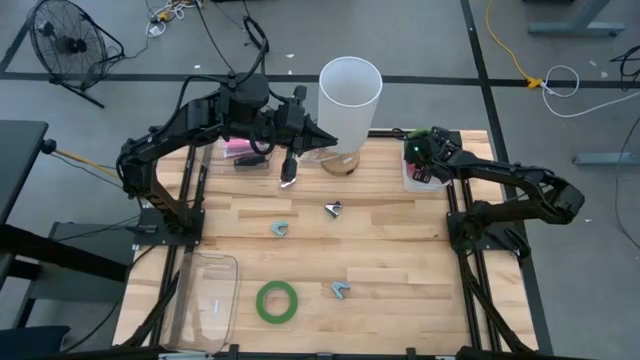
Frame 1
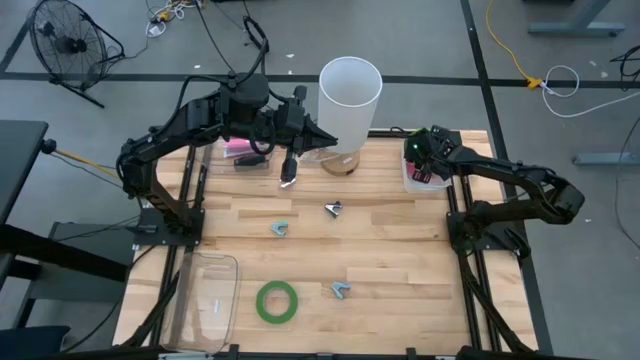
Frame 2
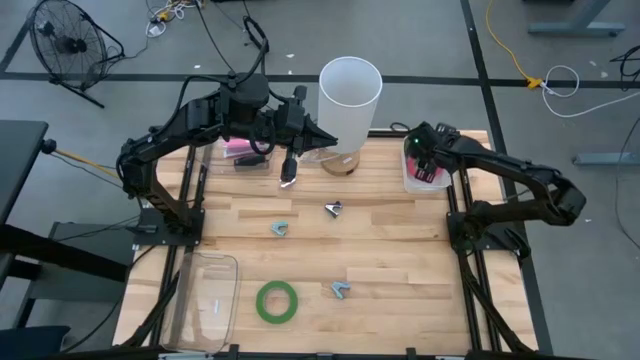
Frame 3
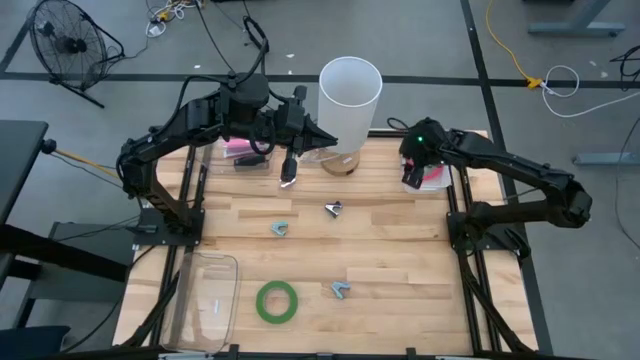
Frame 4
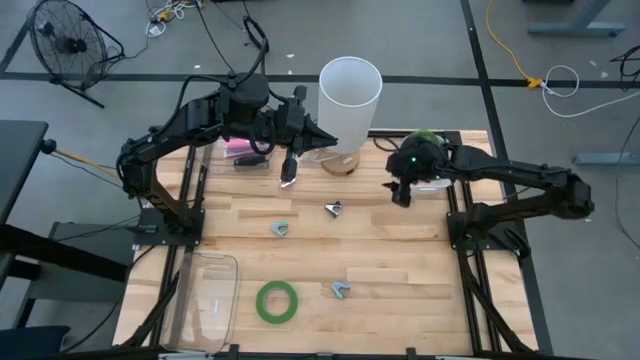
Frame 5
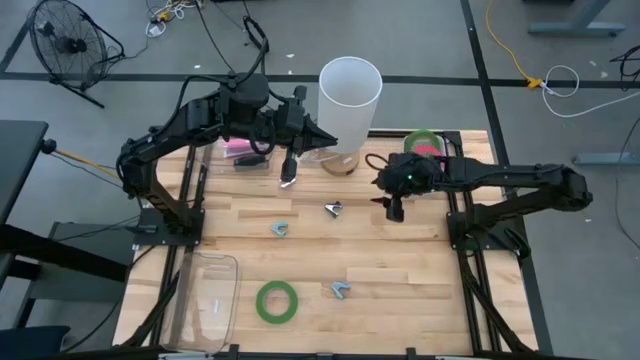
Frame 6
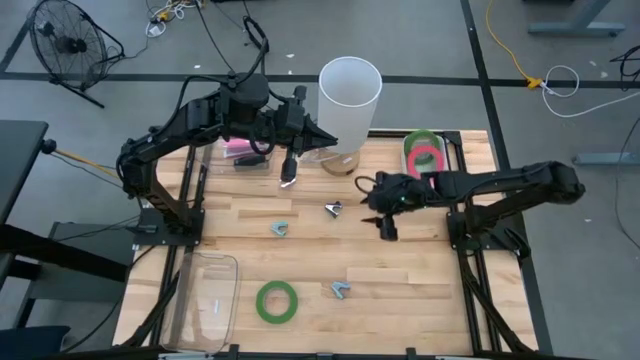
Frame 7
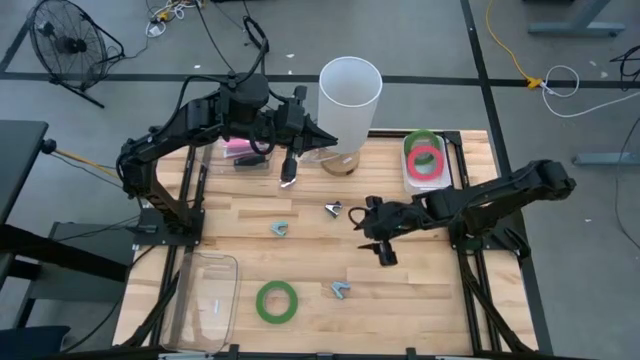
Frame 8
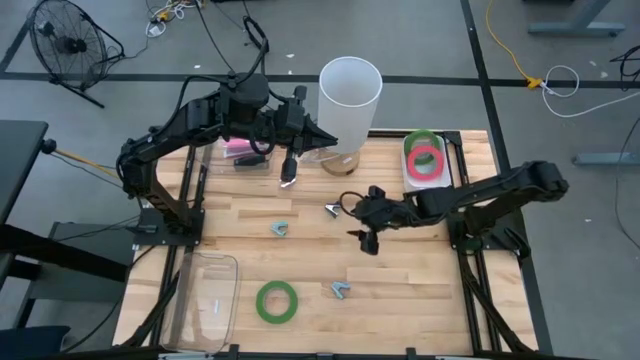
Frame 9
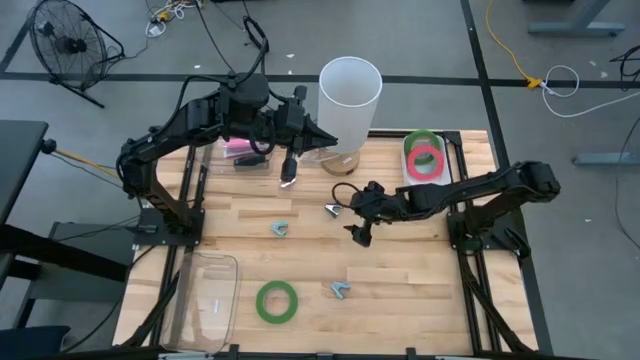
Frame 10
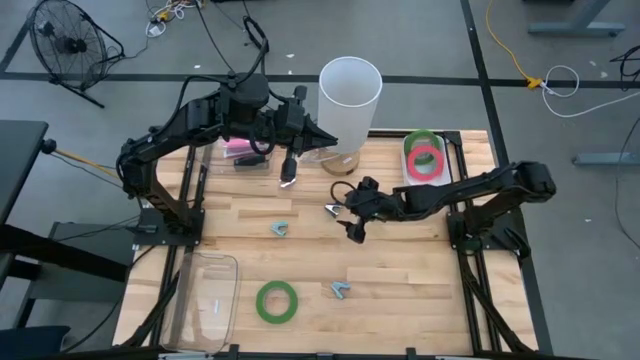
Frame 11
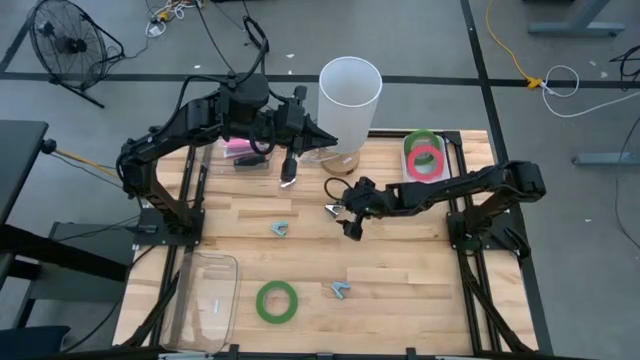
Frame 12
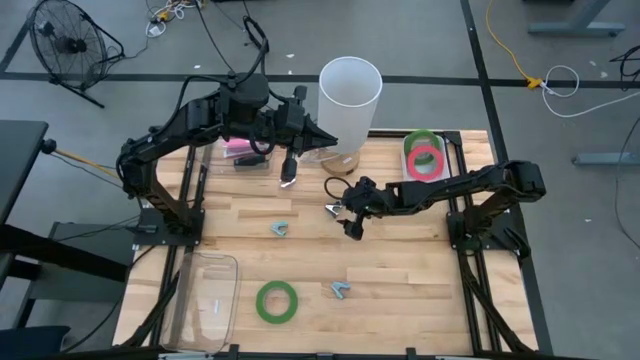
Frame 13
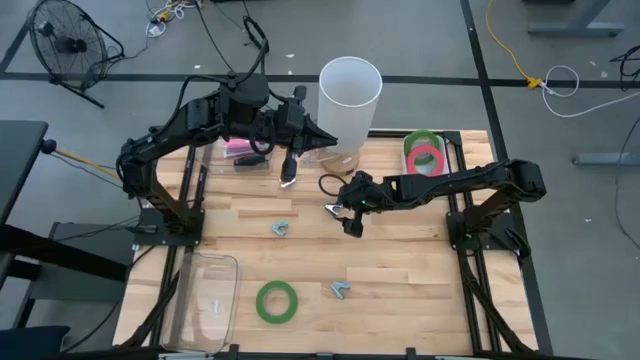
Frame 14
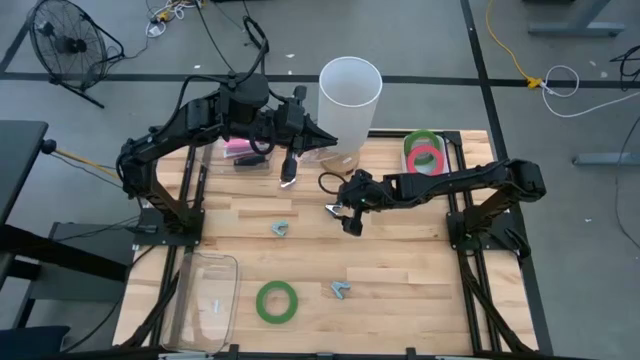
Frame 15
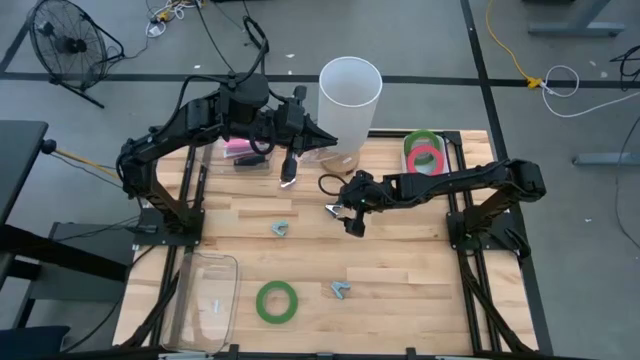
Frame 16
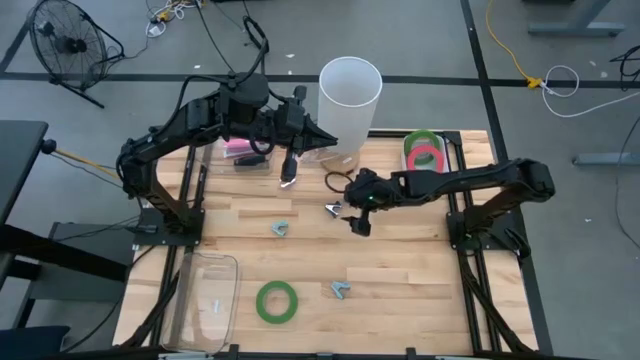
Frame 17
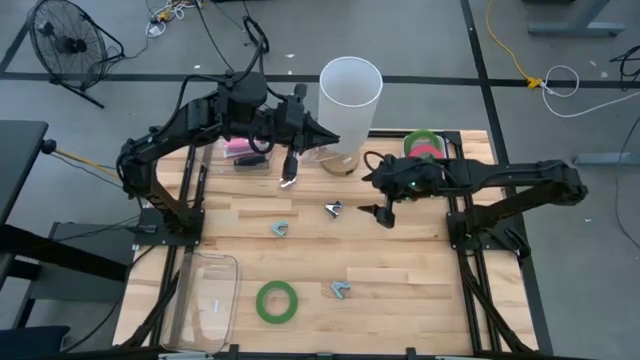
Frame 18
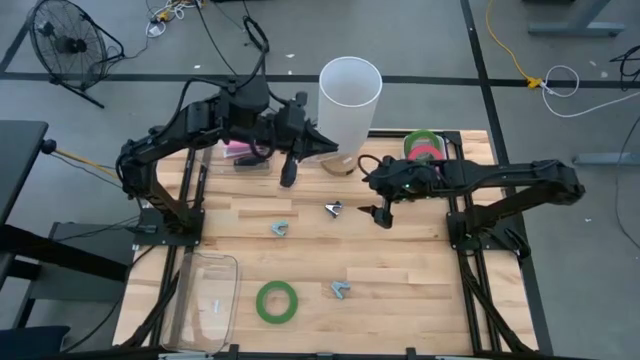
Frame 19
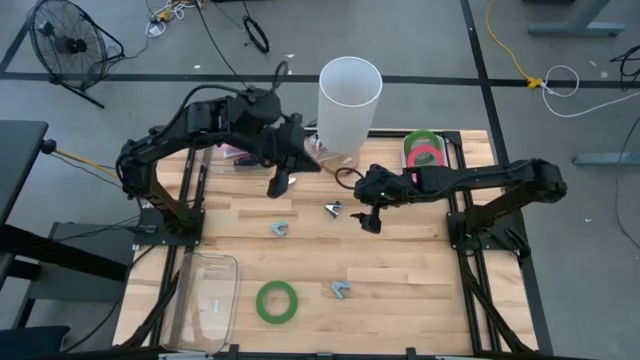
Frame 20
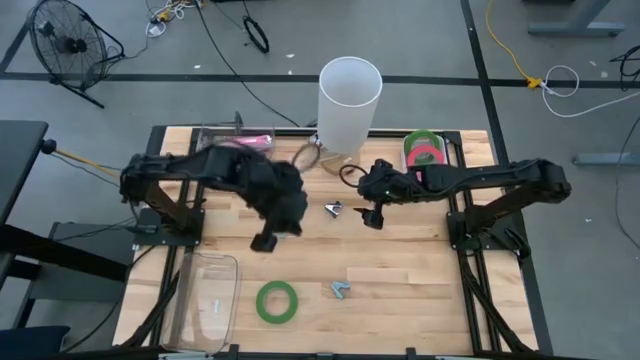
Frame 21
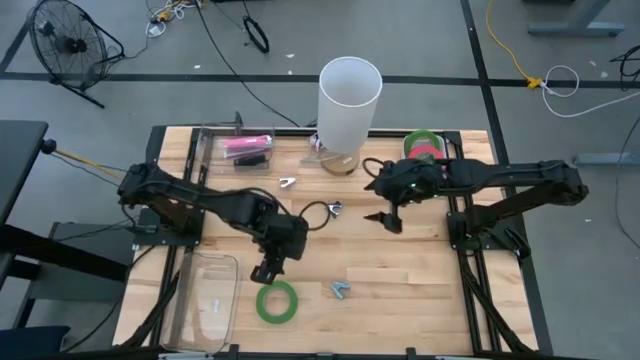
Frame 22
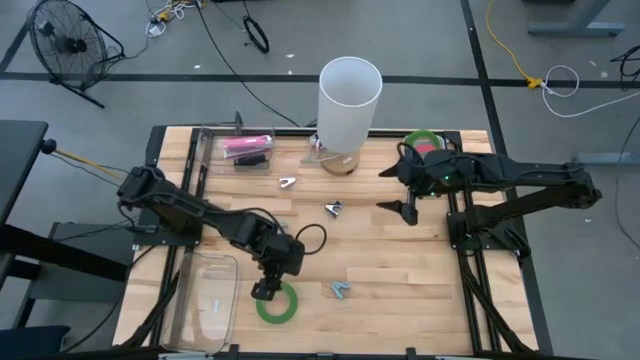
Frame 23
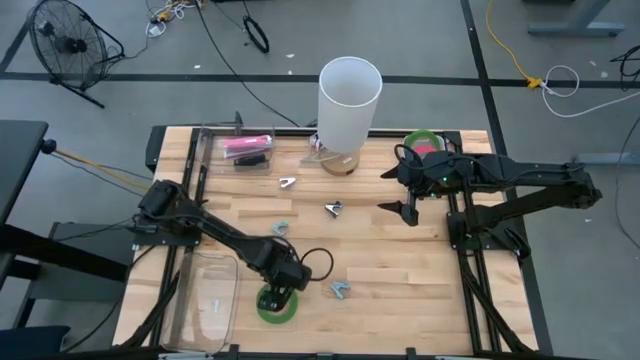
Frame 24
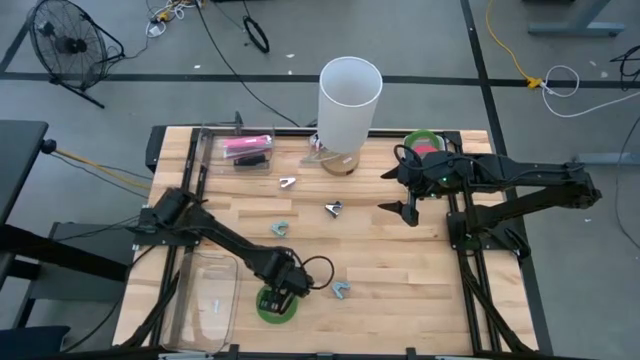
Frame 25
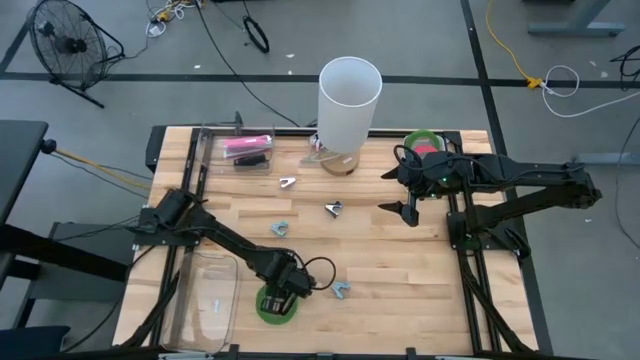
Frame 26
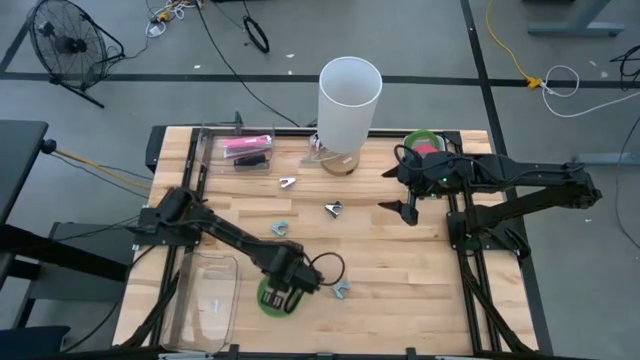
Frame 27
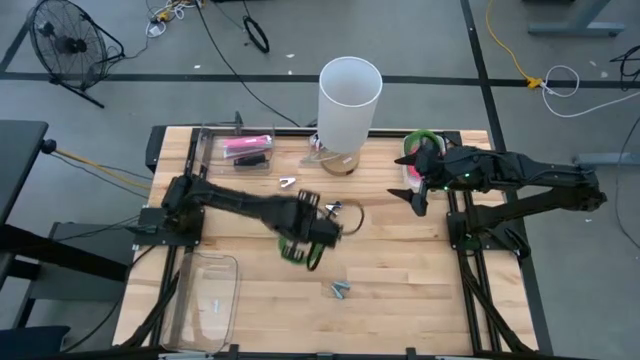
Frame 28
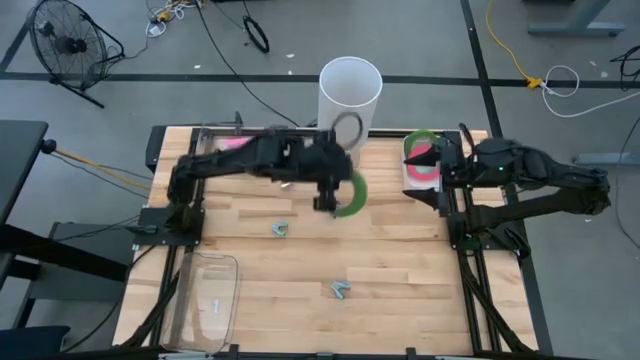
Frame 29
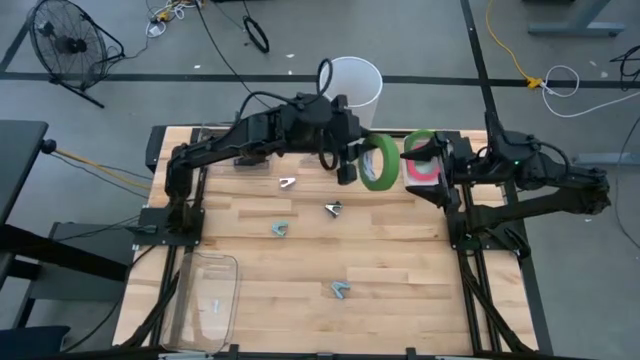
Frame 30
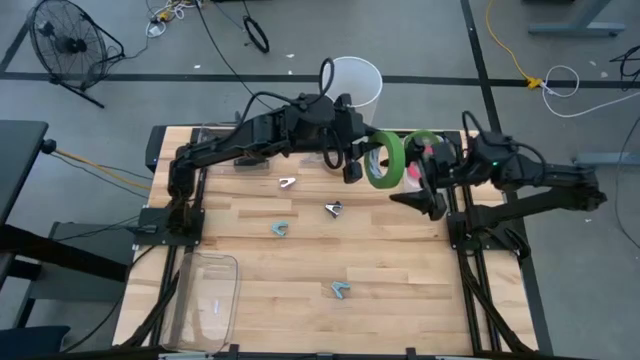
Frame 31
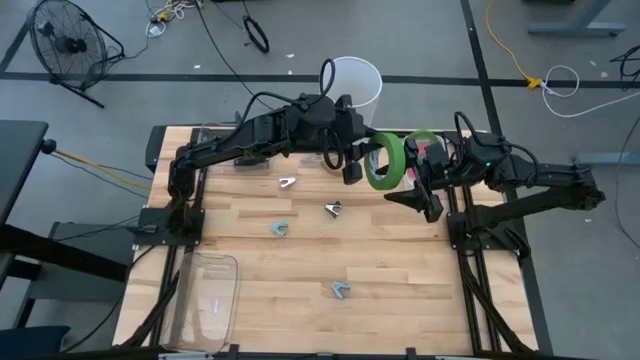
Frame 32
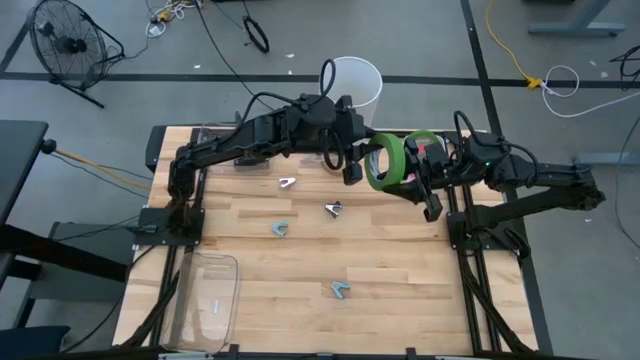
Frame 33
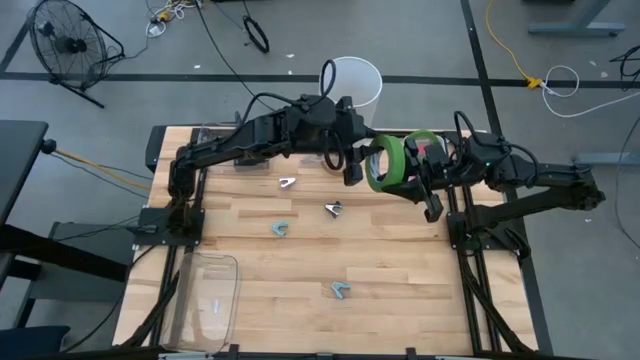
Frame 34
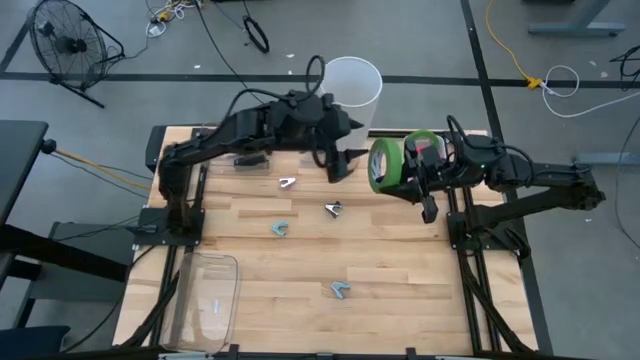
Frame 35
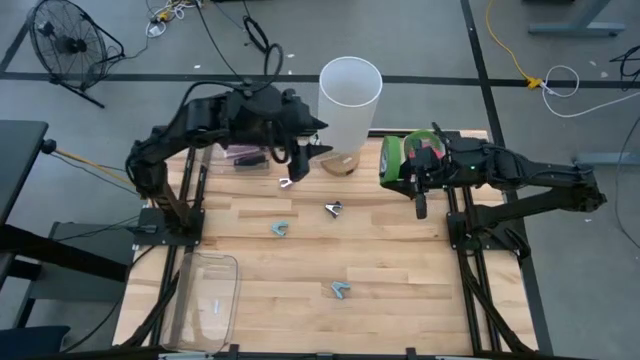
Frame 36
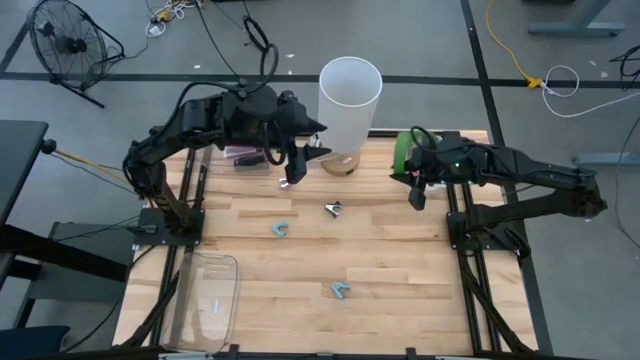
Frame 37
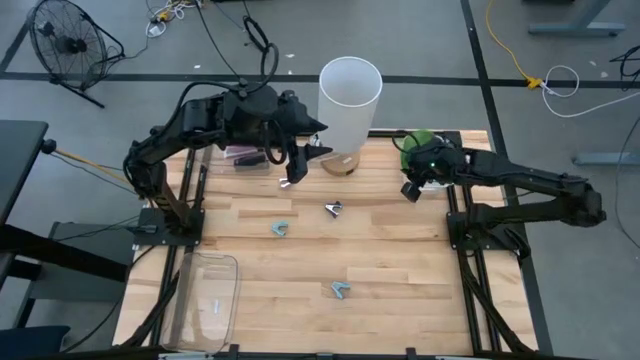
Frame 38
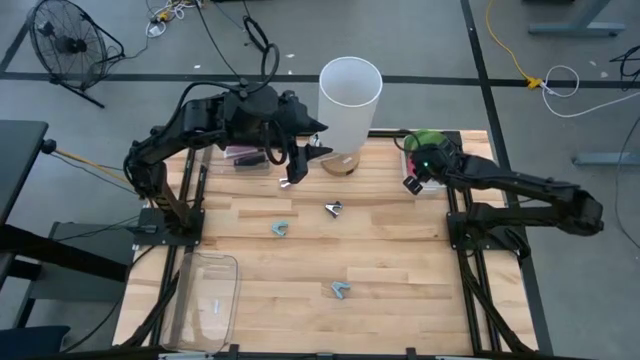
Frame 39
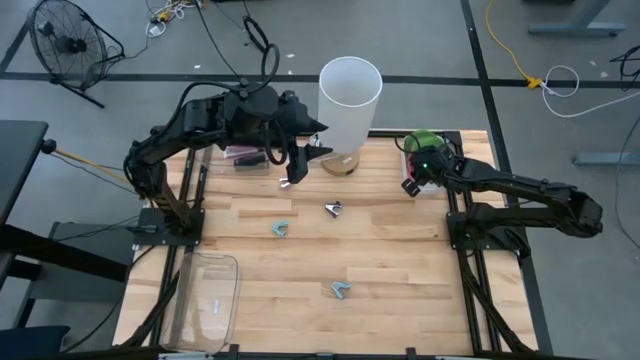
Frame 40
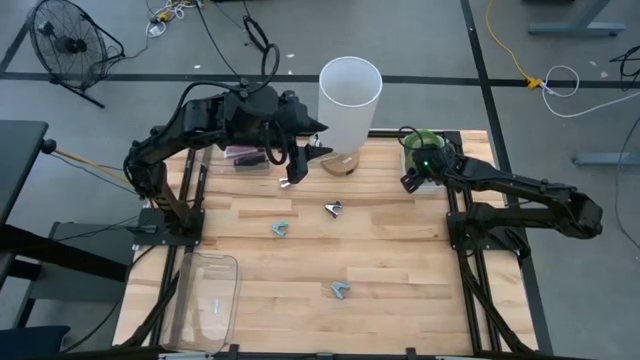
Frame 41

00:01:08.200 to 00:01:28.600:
Task: Pick and place Stapler, Stapler remover, tape
Put the green tape into the white bin
